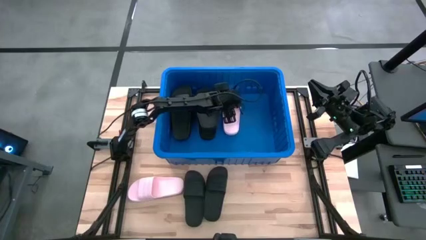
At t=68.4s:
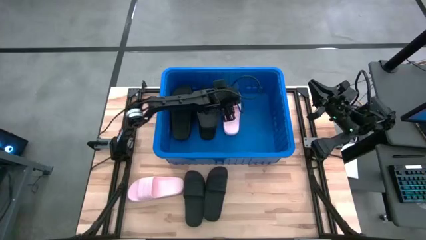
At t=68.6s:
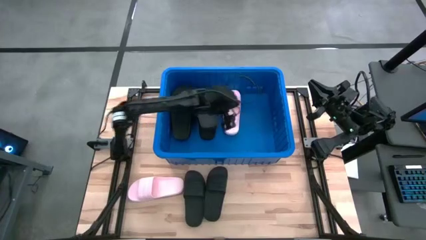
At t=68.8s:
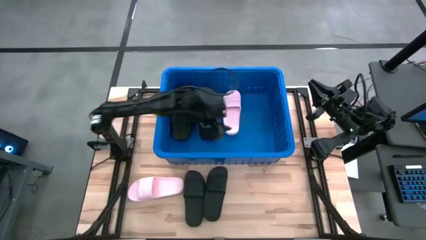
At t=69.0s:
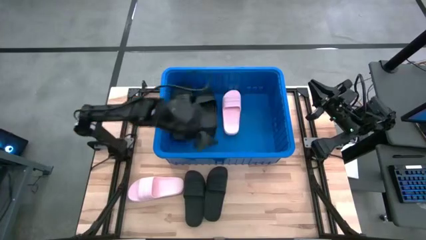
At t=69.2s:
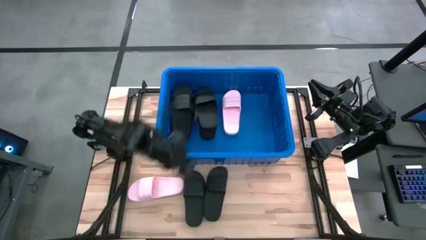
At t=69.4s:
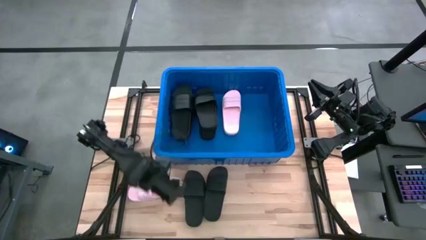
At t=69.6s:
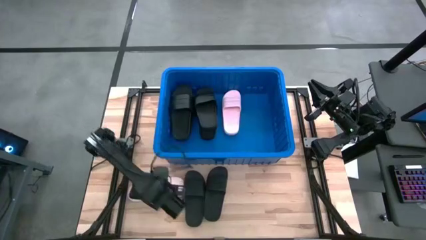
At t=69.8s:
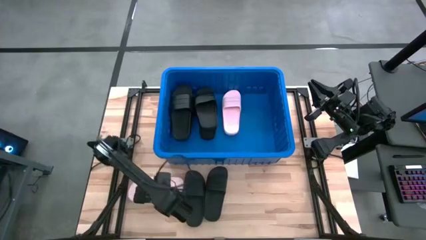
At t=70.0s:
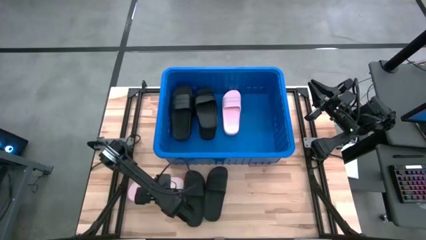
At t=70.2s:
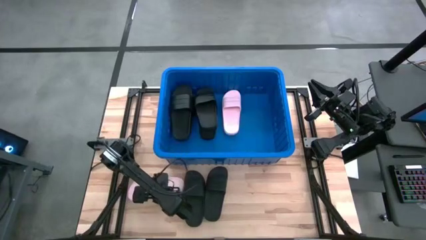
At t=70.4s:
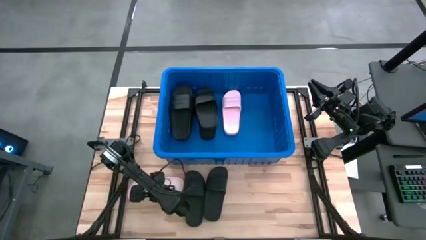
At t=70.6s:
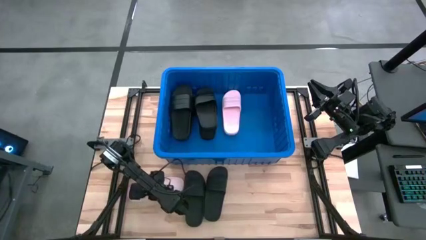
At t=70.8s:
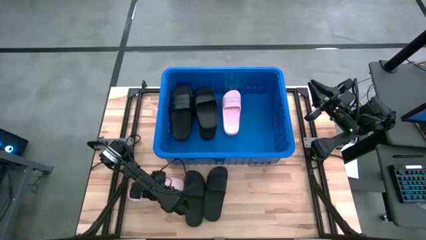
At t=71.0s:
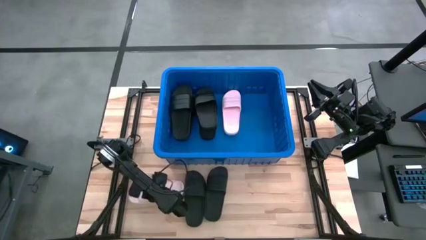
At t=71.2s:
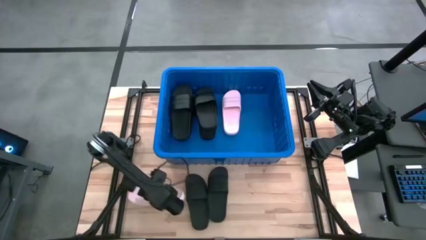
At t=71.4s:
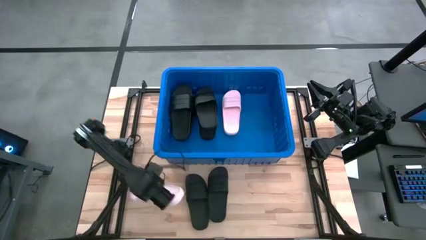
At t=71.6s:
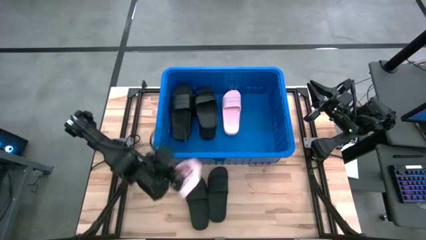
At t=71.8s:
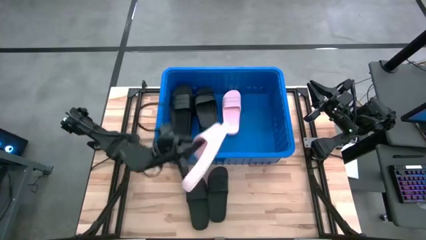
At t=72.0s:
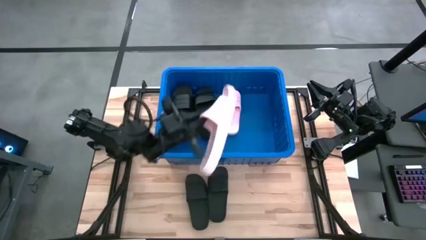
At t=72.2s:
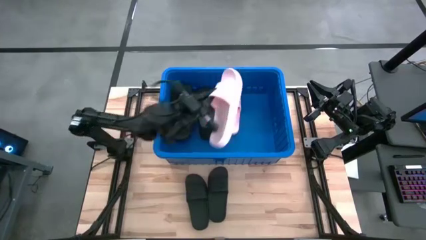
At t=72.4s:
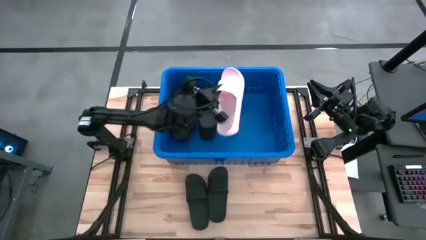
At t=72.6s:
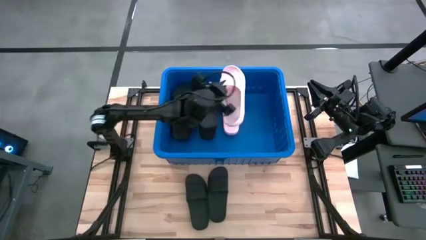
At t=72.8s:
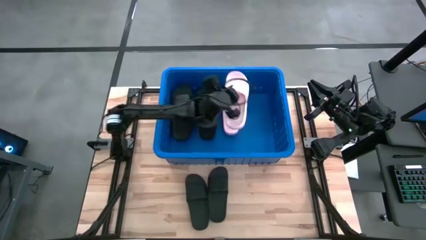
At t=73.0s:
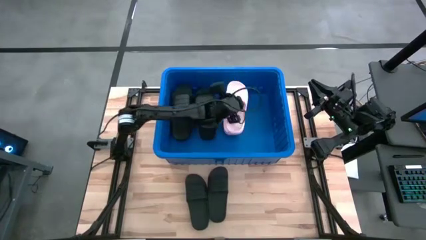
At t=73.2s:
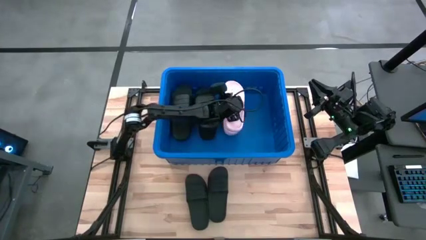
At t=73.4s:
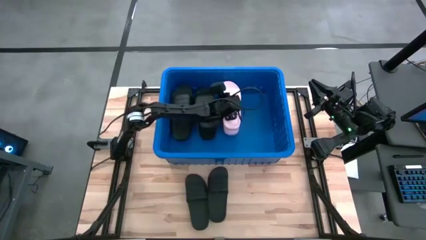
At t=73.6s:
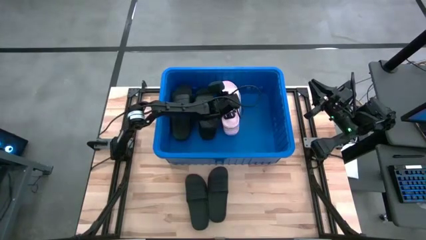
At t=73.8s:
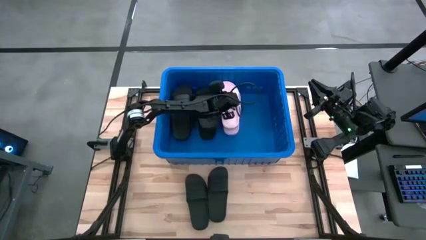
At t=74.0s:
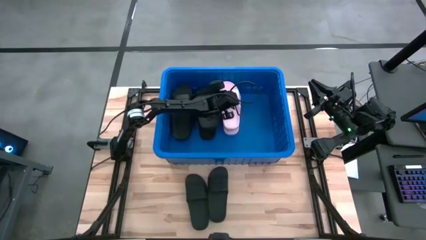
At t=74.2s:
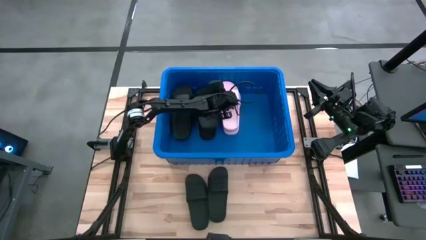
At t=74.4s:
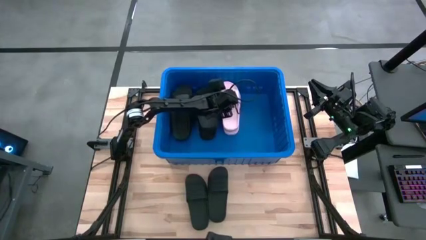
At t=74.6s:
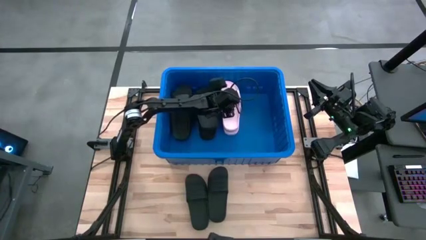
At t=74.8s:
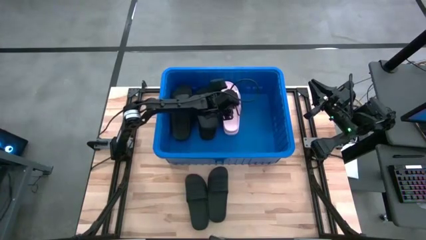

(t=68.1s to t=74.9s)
Task: Pick and place slides into bin
Put the pink slide into the blue organizer bin

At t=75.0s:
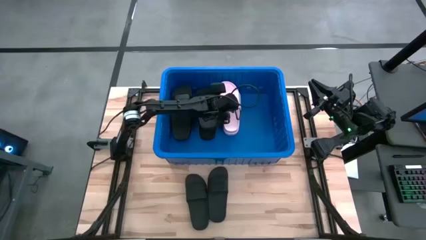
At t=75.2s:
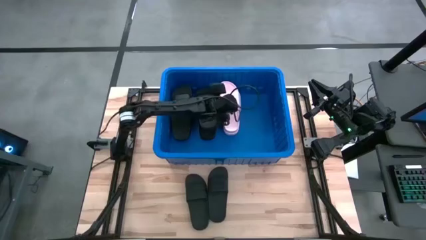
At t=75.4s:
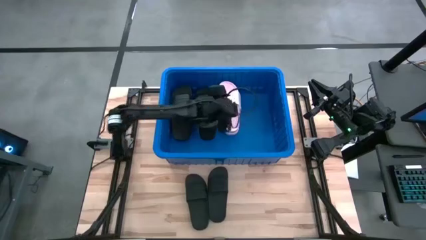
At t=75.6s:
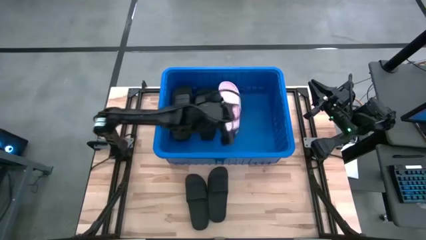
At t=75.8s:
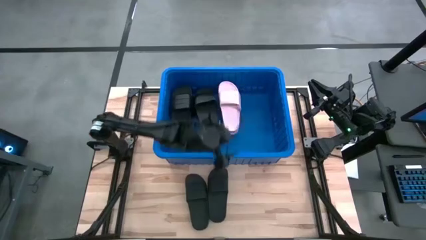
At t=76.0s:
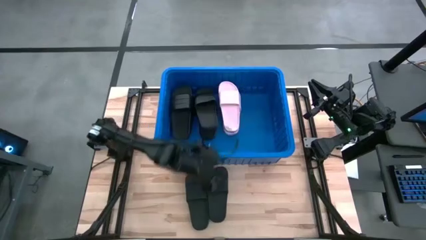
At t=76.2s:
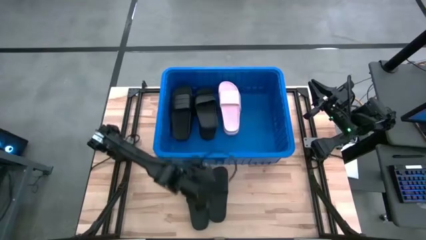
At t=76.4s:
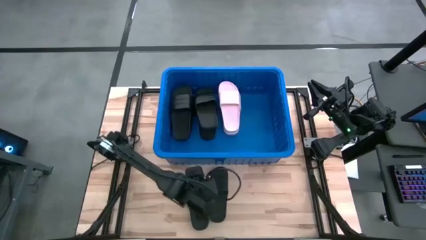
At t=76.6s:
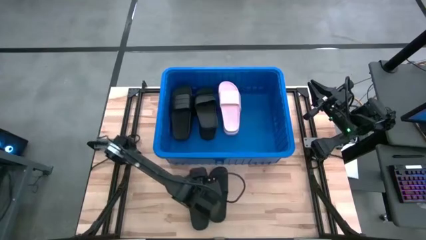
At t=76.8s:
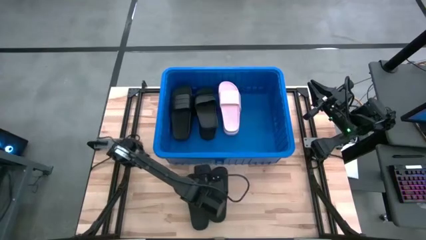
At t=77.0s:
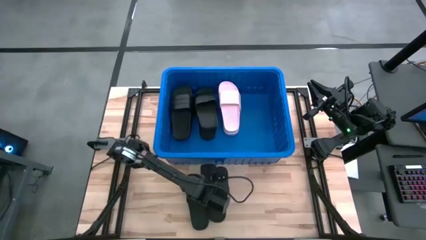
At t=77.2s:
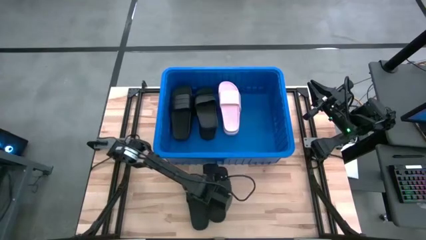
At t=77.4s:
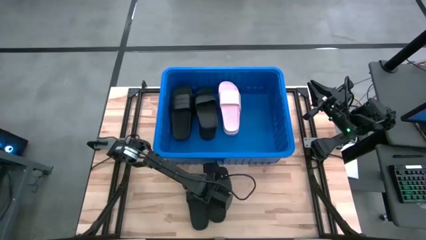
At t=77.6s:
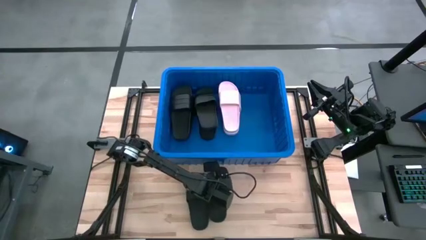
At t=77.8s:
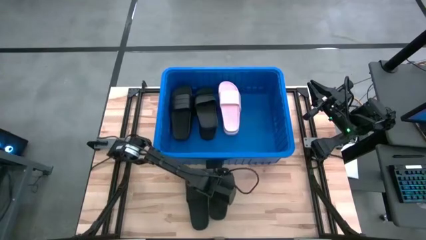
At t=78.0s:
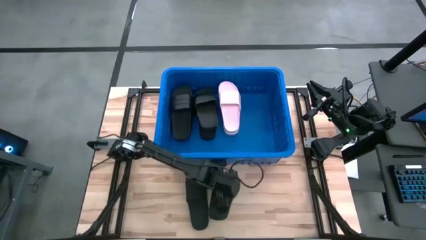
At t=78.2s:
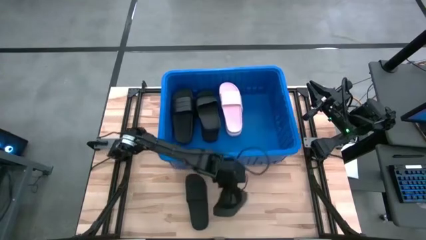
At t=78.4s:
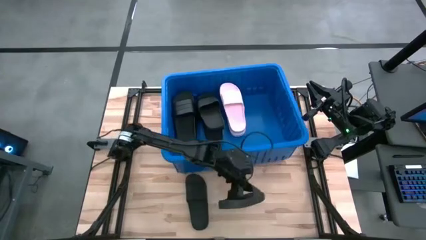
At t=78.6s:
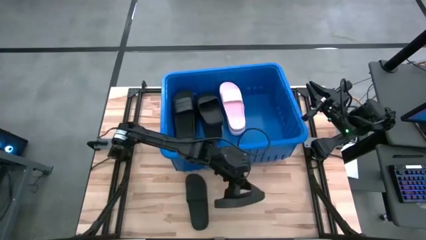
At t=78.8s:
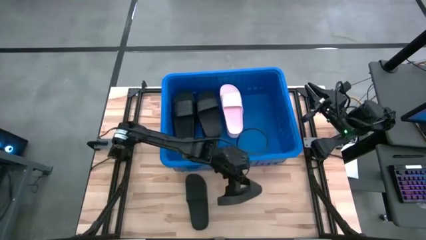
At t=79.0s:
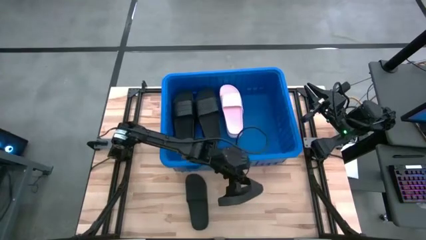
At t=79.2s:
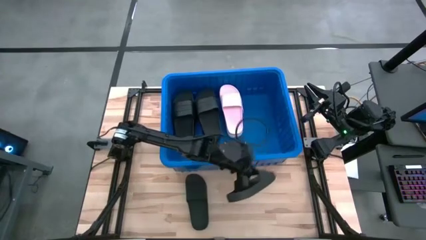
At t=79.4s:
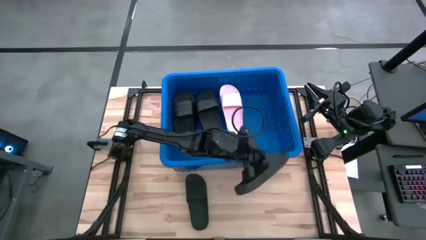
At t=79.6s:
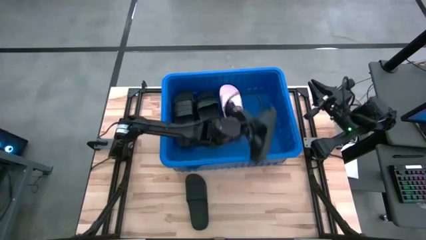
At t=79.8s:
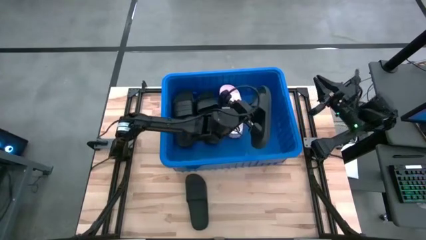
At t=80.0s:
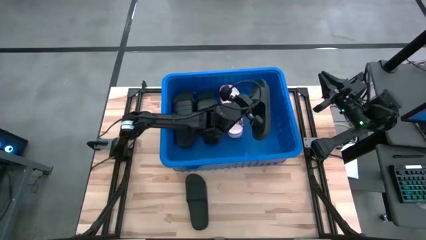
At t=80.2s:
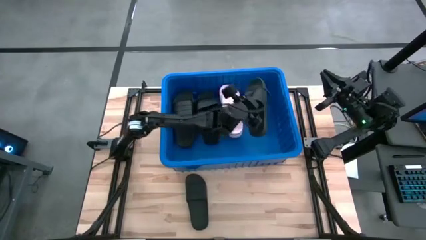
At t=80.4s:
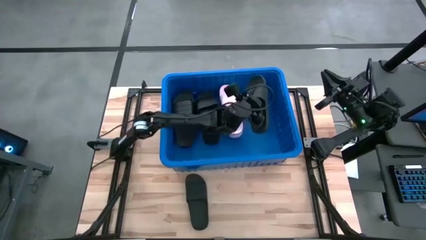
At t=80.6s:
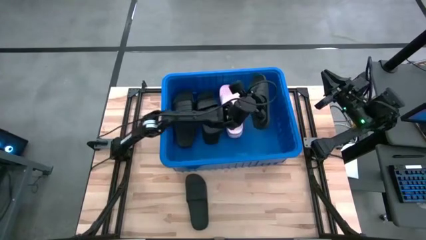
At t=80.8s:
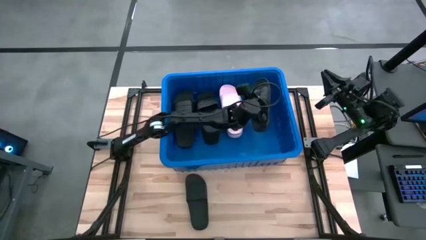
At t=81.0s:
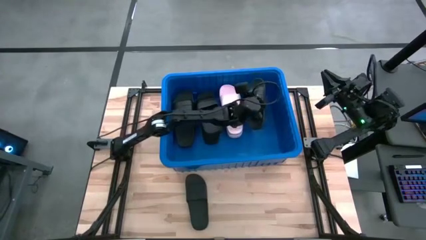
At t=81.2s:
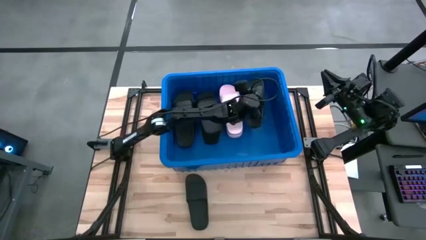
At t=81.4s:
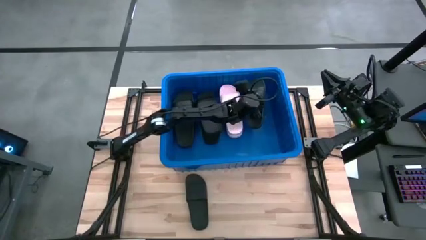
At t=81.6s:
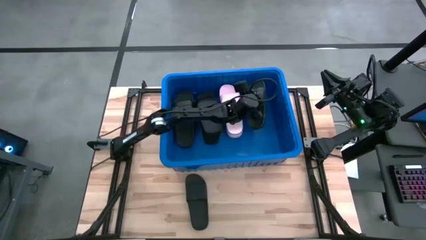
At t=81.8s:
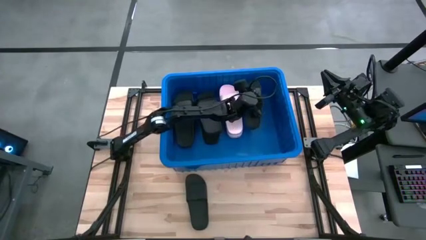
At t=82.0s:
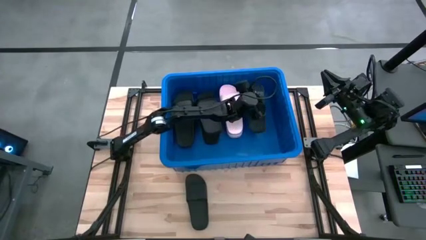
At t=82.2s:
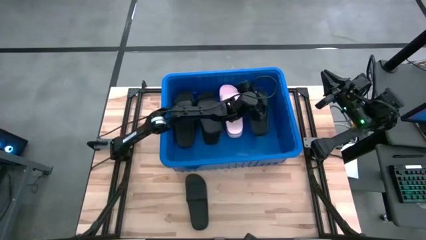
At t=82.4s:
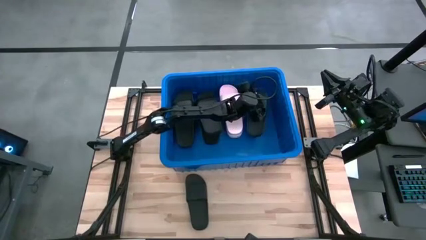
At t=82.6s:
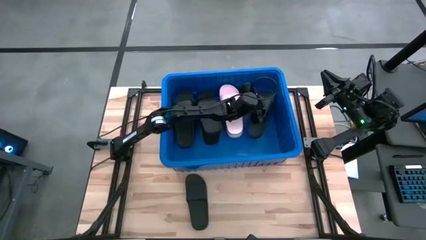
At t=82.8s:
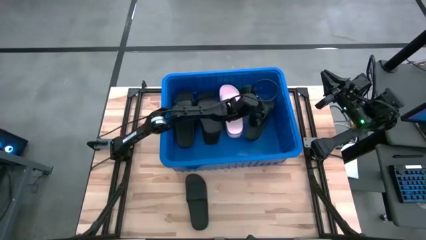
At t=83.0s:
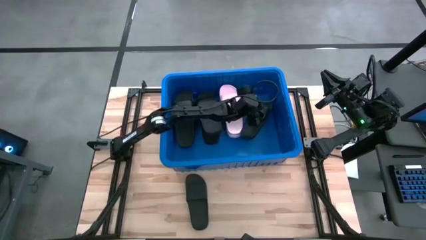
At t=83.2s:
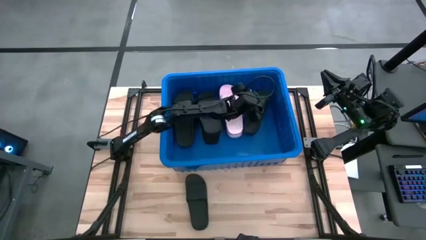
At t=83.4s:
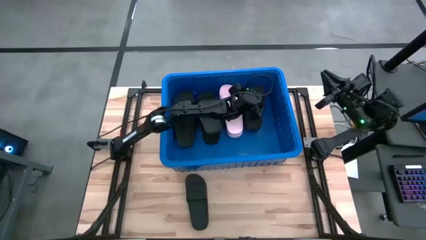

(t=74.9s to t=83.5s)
Put the black slide into the blue organizer bin
